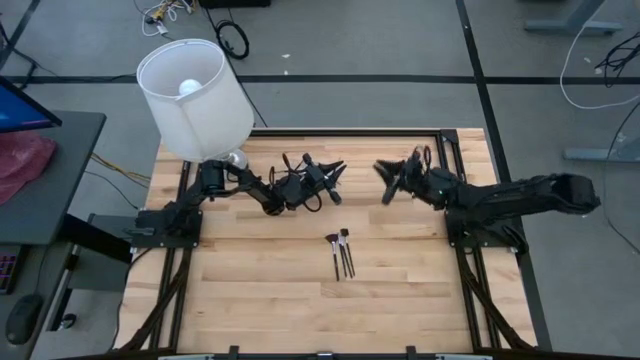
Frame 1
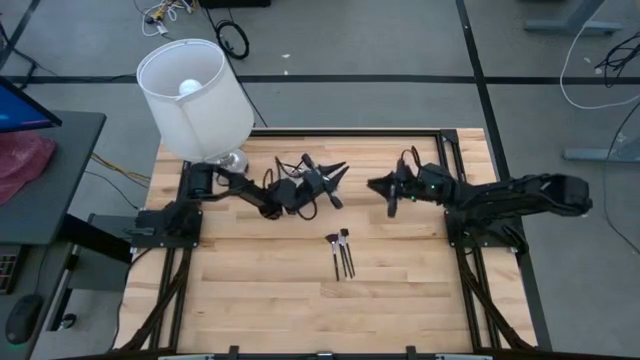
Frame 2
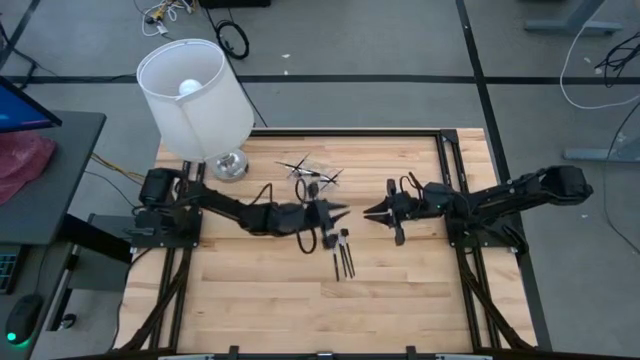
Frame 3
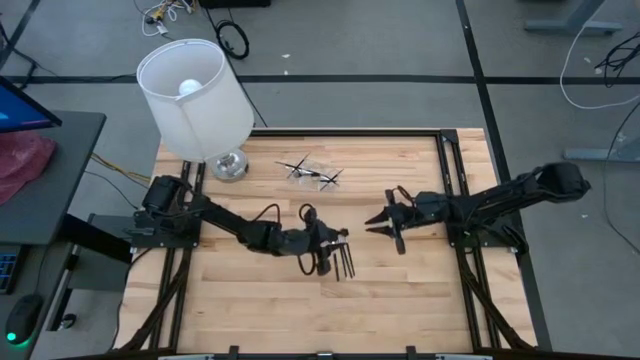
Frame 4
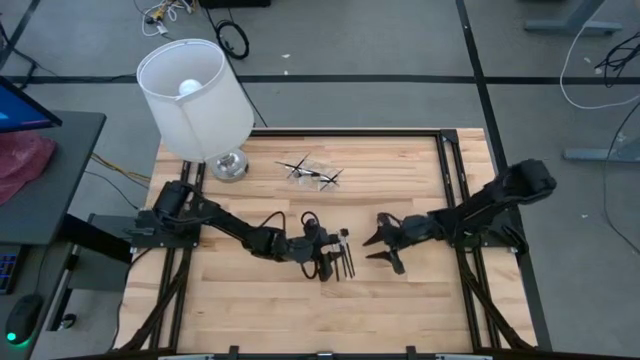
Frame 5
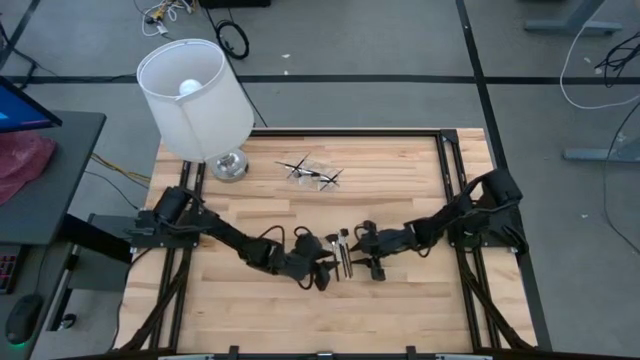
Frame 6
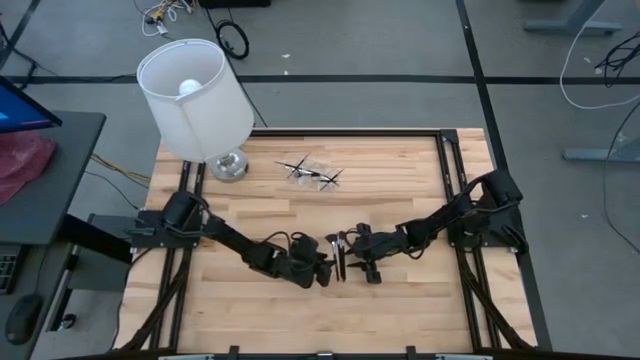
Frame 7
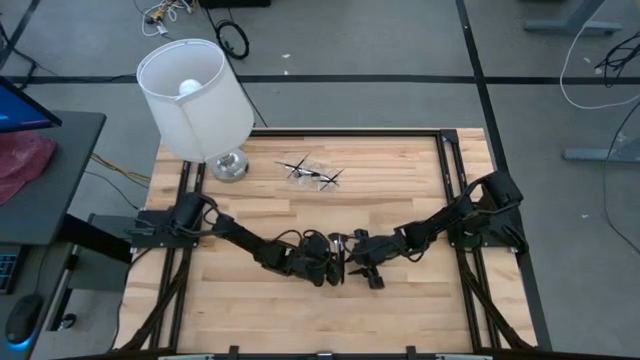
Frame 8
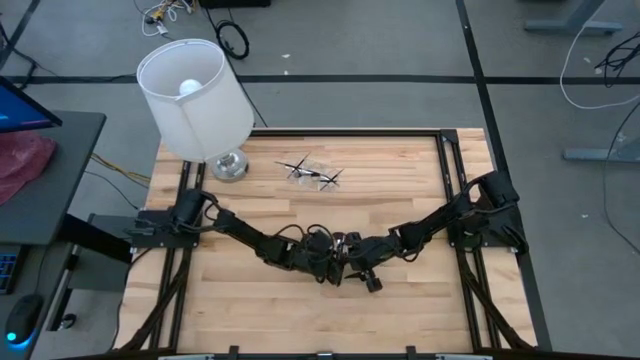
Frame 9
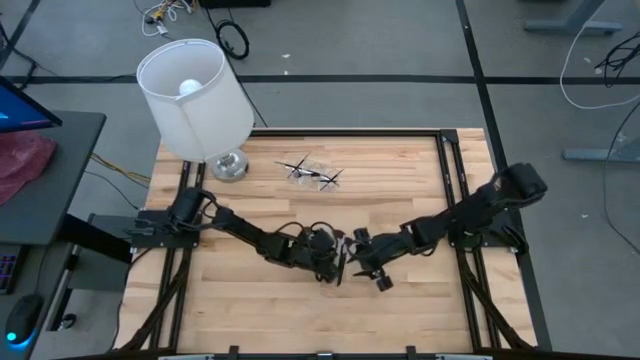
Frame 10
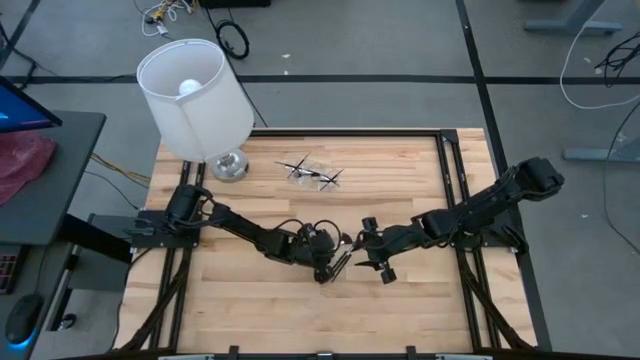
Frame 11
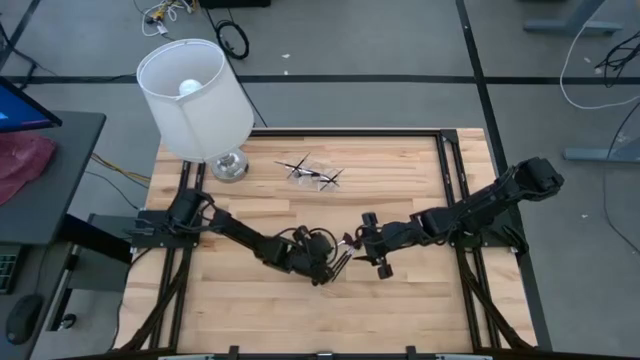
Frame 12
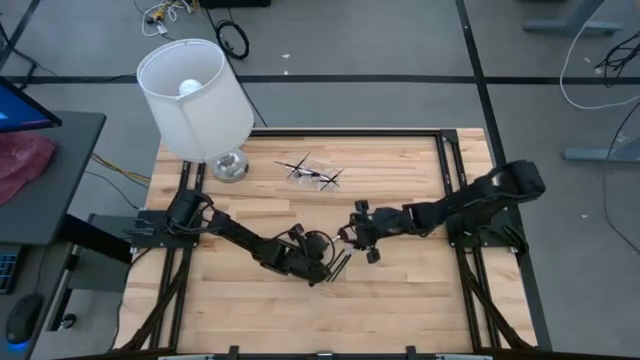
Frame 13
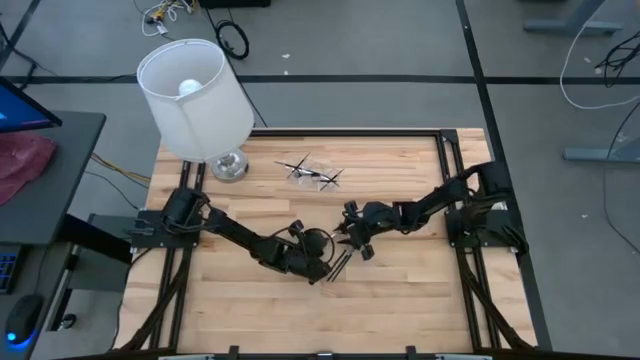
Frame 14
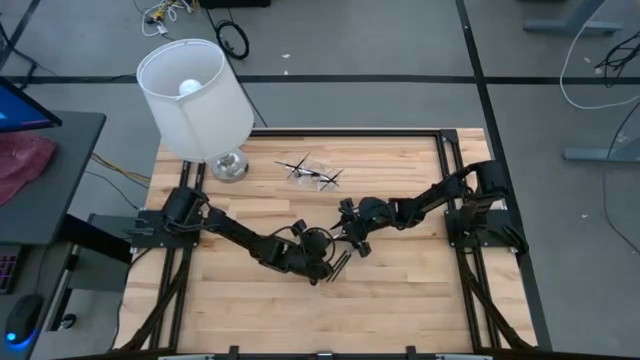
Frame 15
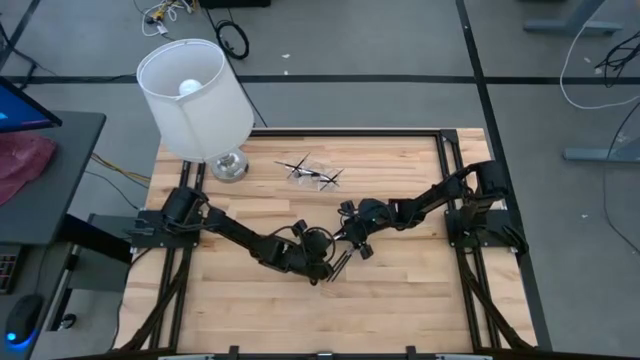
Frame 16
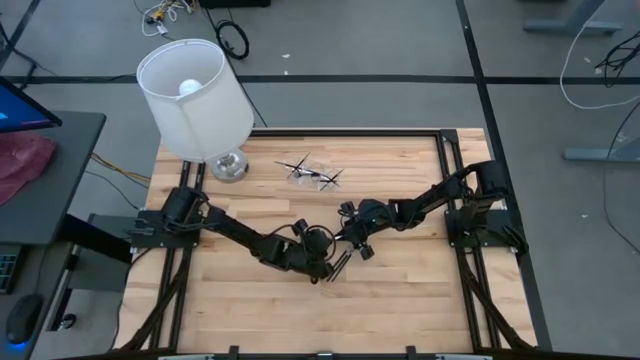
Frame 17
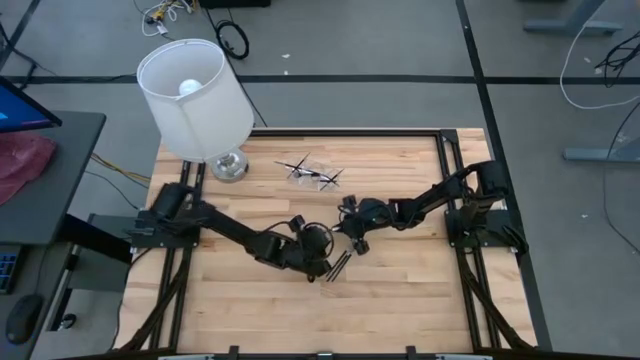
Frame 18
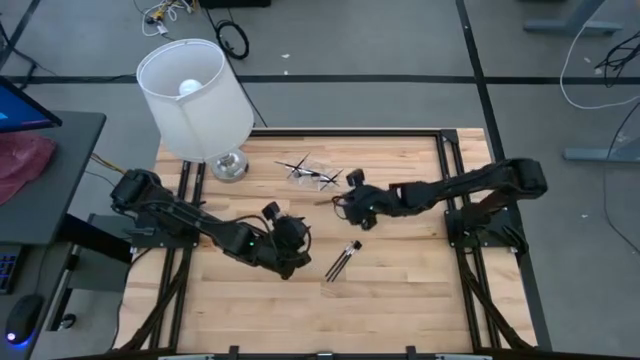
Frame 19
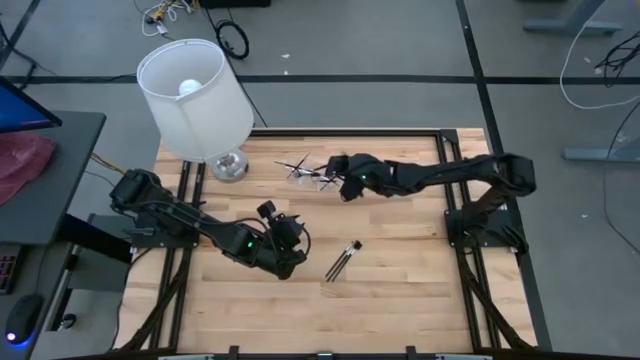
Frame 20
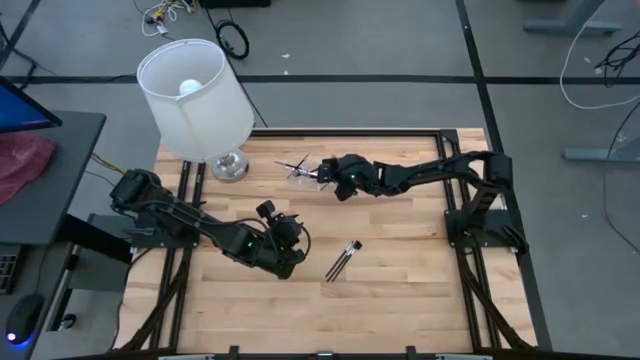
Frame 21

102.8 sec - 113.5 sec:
Task: Put items in baskets/containers
Put the black highlighter brush into the transparent organizer

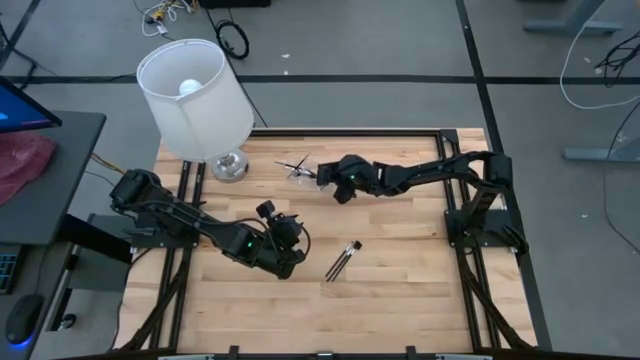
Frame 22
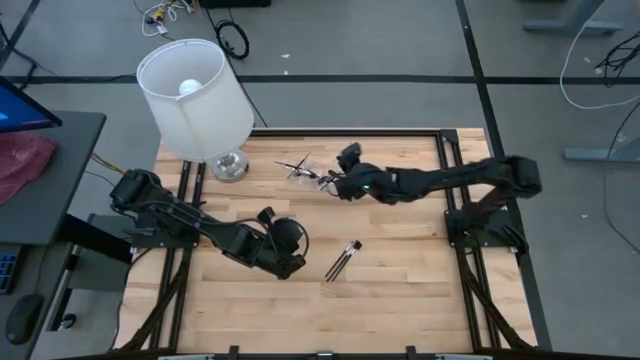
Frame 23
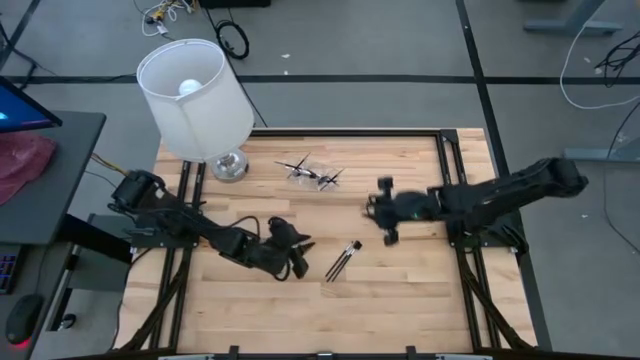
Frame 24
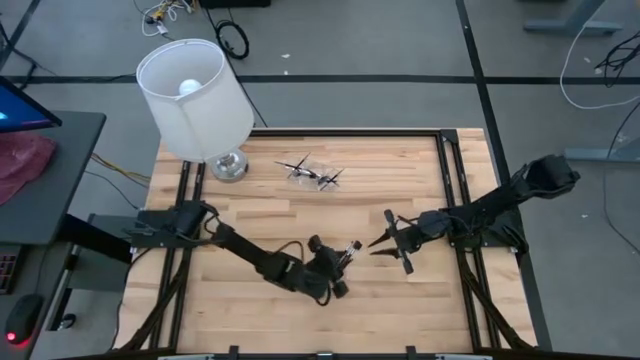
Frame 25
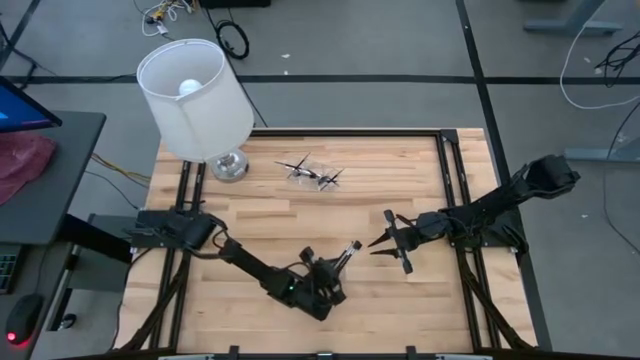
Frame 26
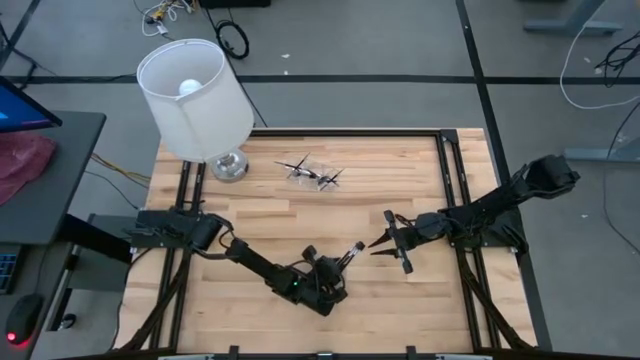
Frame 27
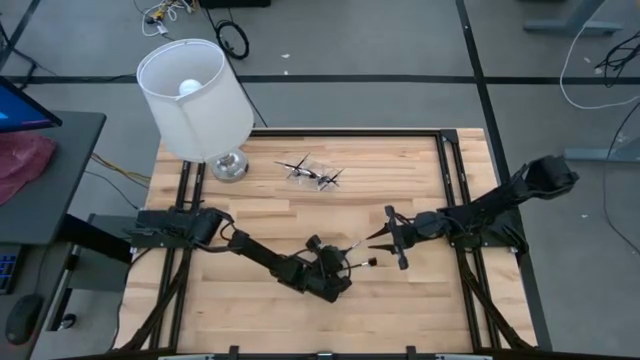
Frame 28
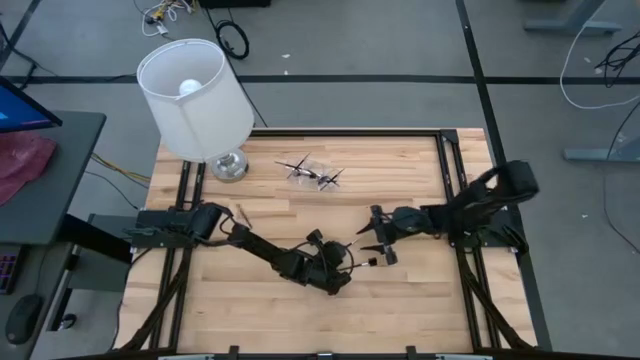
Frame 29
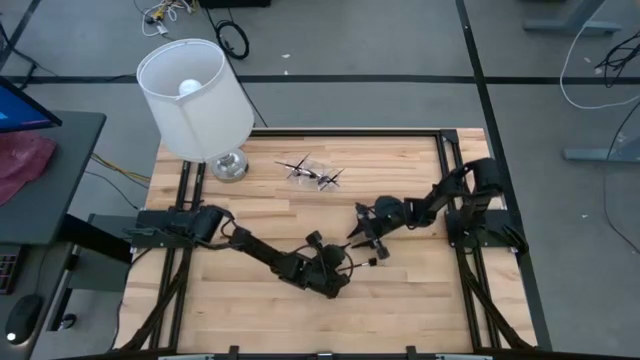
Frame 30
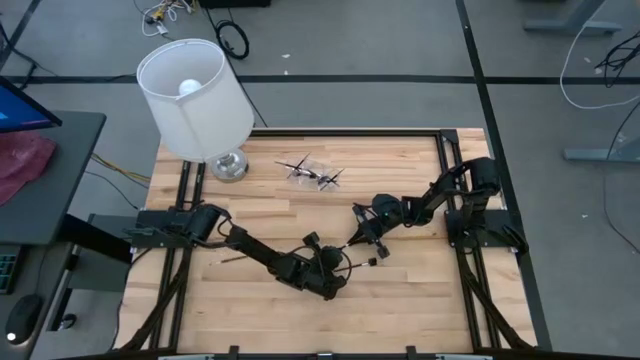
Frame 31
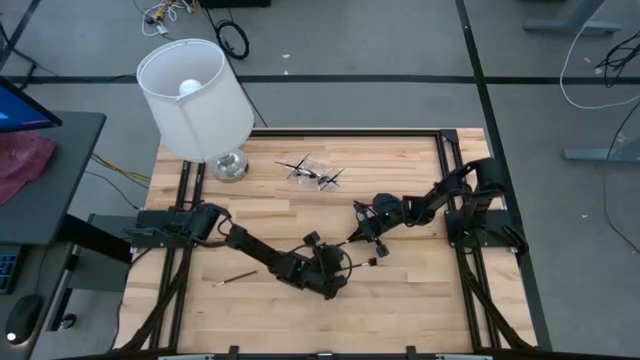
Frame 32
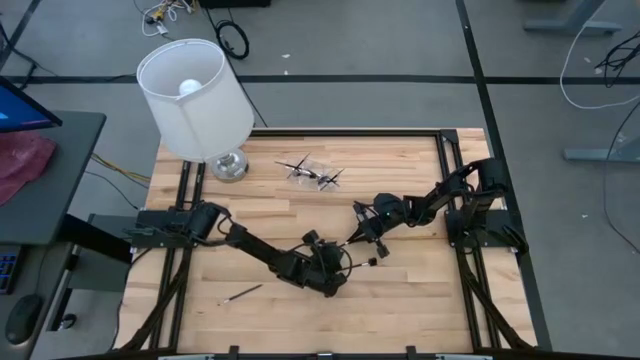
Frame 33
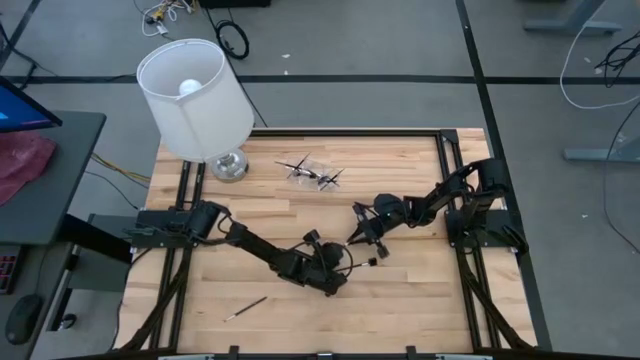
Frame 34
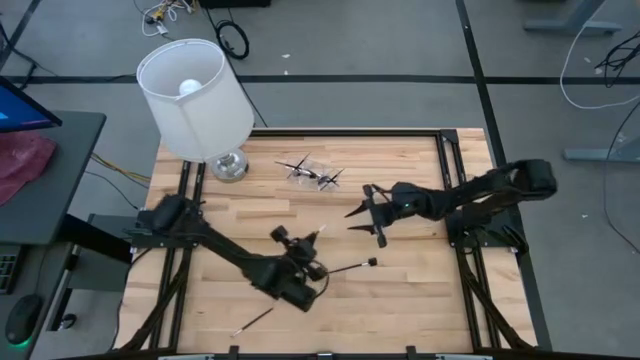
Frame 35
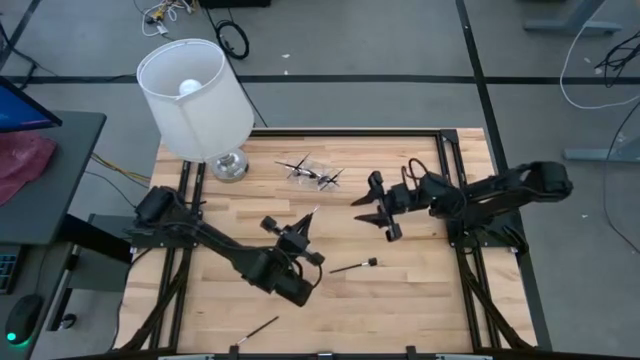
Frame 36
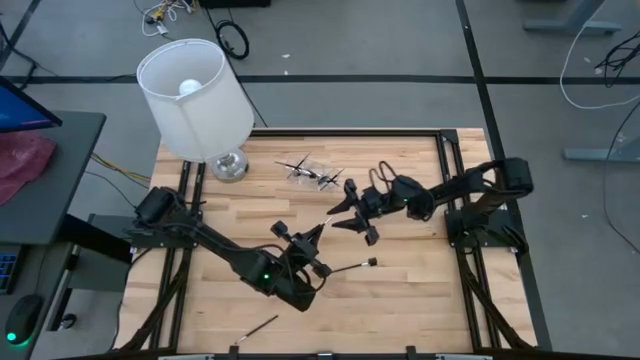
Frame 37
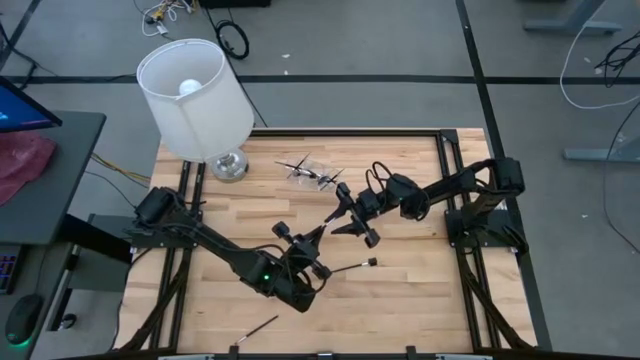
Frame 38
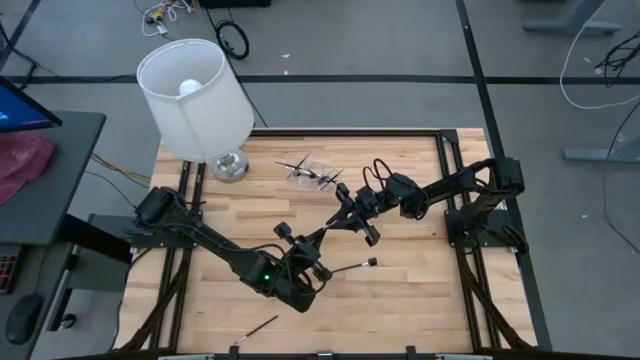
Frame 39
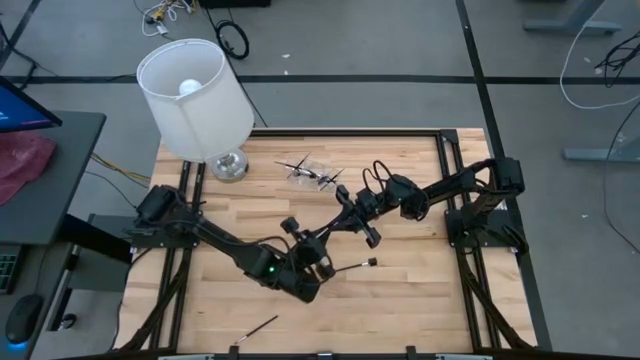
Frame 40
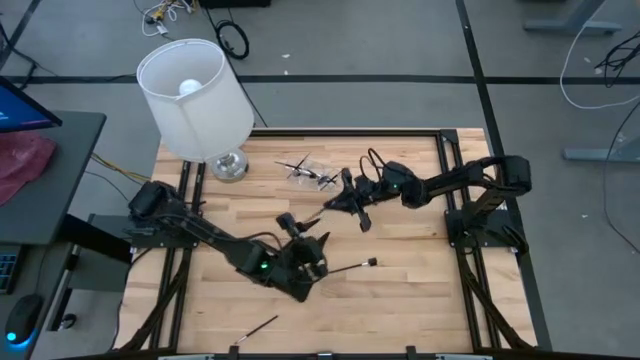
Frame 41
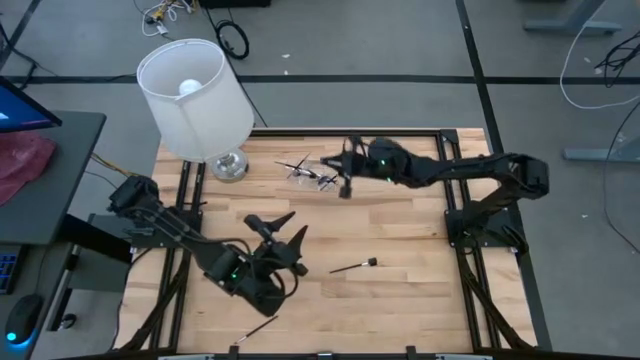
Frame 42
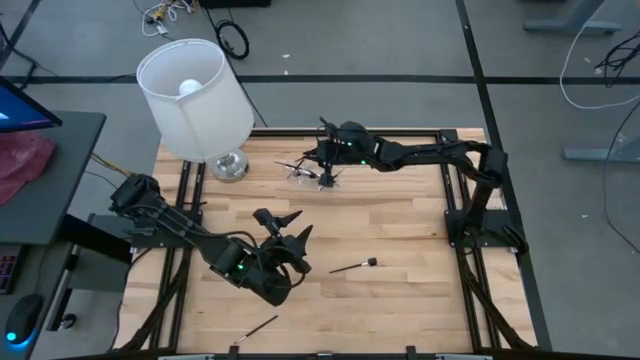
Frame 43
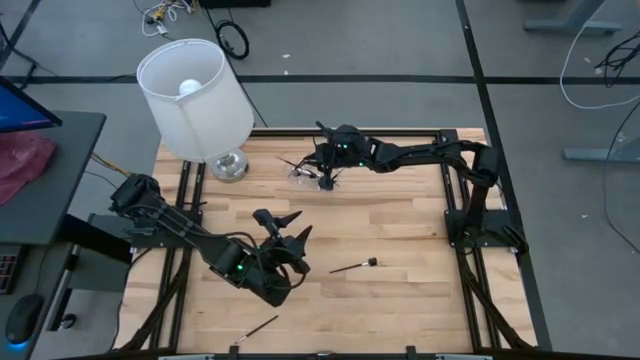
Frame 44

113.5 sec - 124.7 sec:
Put the black eyeliner brush into the transparent organizer
